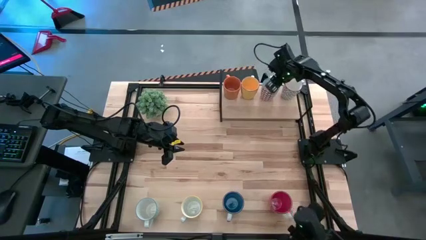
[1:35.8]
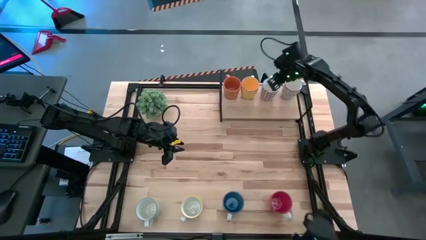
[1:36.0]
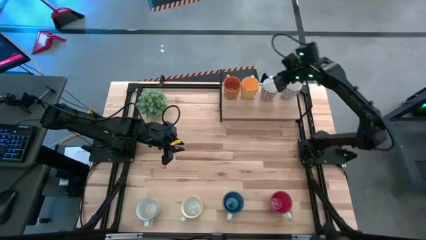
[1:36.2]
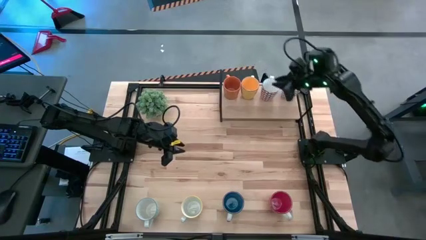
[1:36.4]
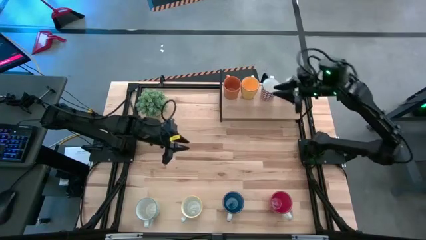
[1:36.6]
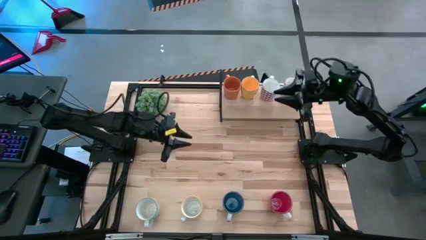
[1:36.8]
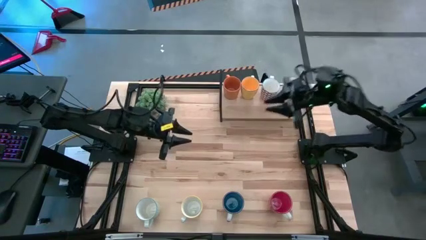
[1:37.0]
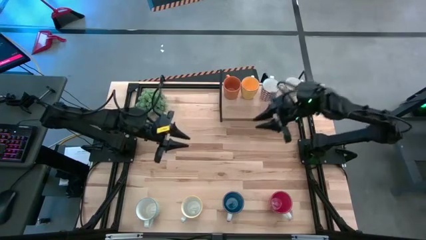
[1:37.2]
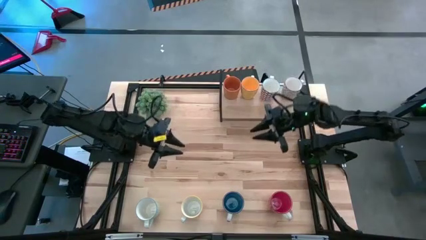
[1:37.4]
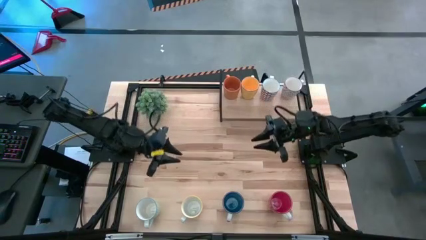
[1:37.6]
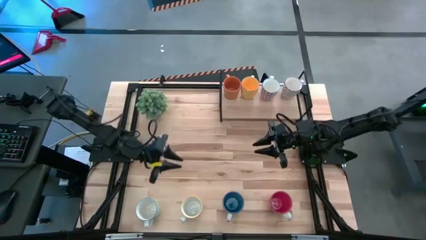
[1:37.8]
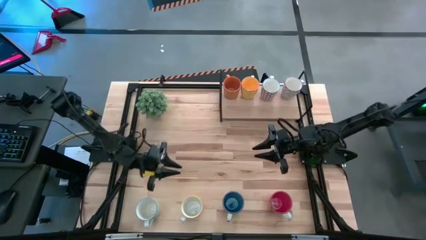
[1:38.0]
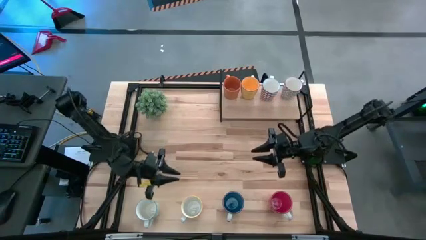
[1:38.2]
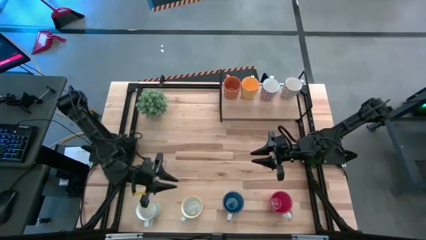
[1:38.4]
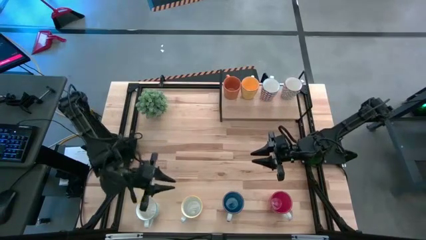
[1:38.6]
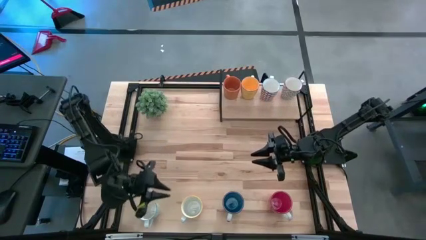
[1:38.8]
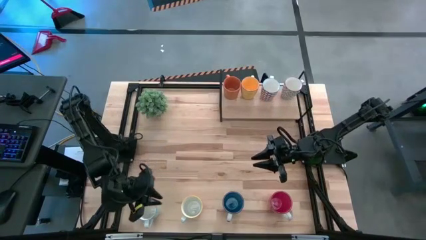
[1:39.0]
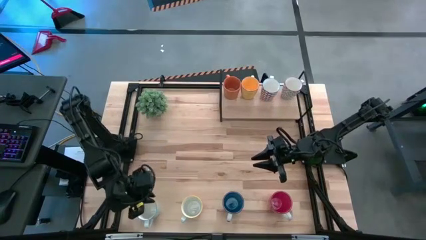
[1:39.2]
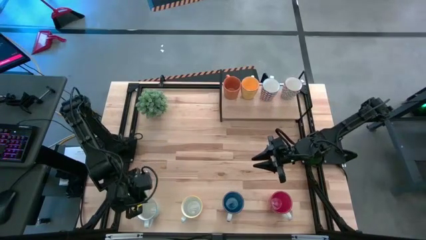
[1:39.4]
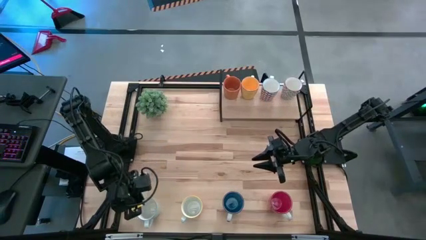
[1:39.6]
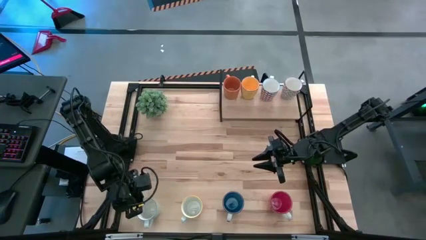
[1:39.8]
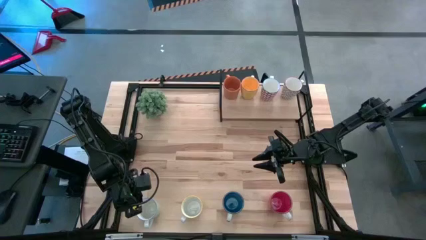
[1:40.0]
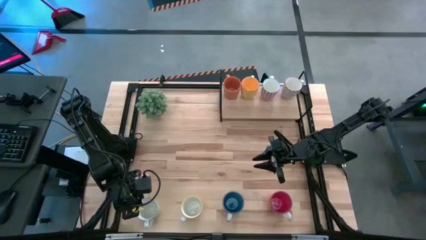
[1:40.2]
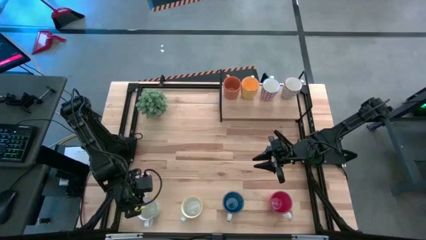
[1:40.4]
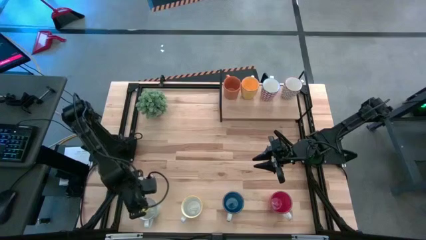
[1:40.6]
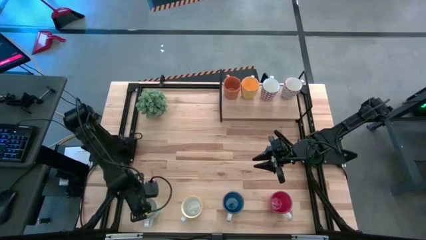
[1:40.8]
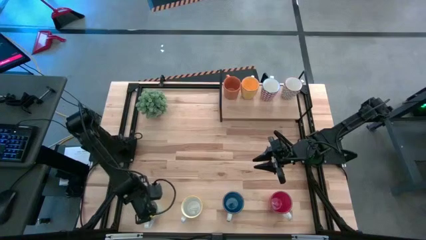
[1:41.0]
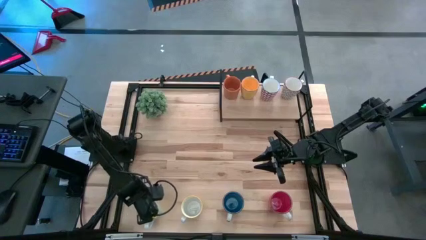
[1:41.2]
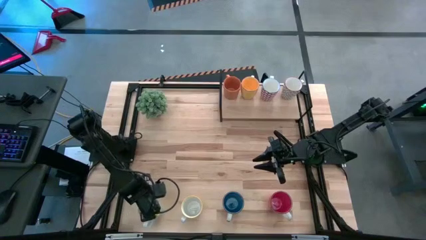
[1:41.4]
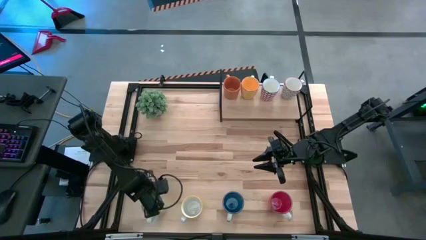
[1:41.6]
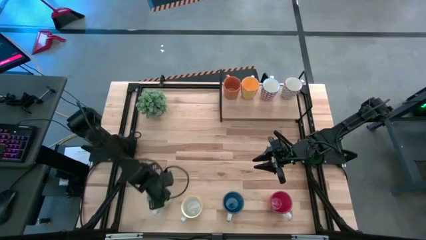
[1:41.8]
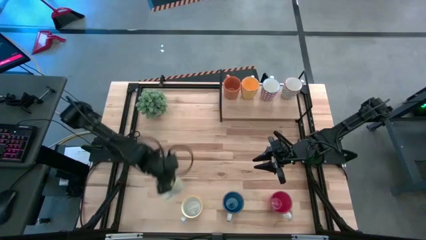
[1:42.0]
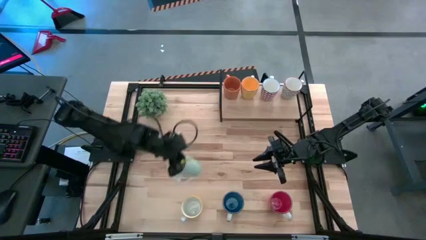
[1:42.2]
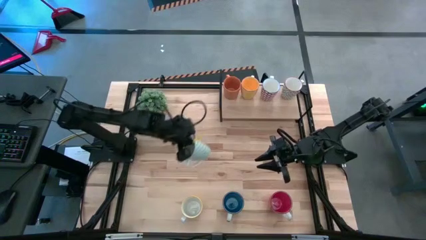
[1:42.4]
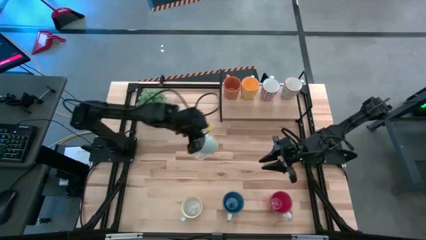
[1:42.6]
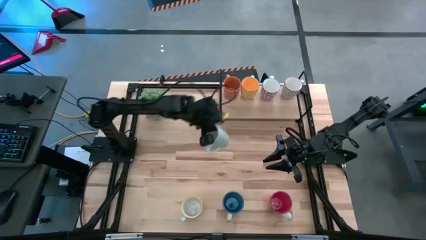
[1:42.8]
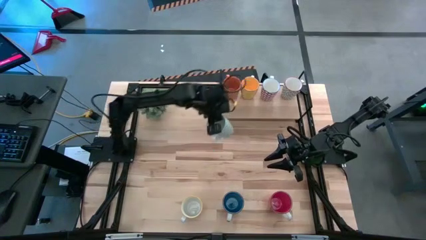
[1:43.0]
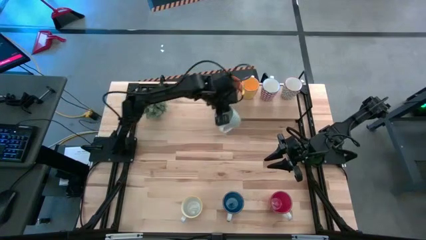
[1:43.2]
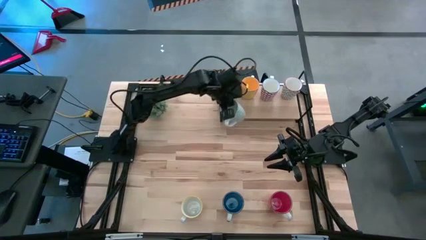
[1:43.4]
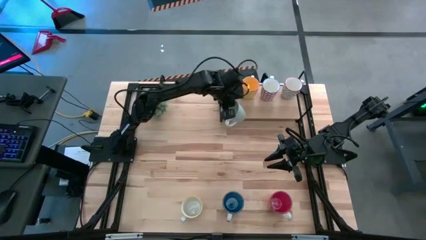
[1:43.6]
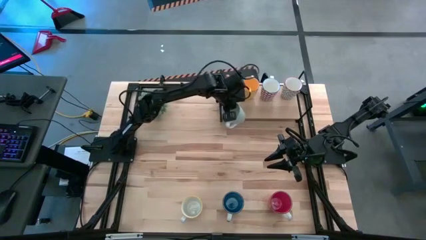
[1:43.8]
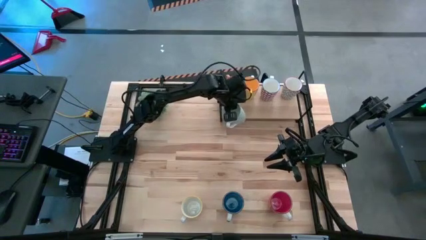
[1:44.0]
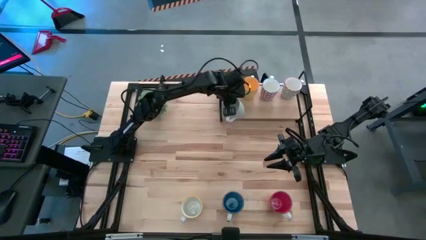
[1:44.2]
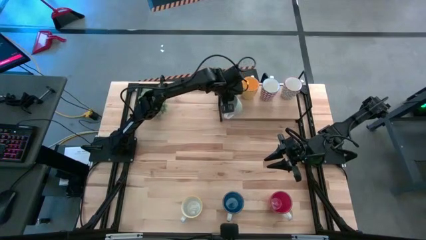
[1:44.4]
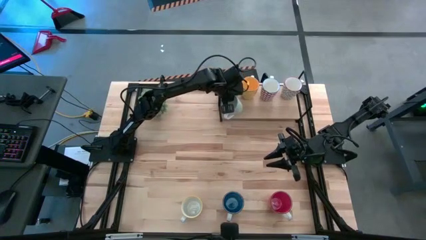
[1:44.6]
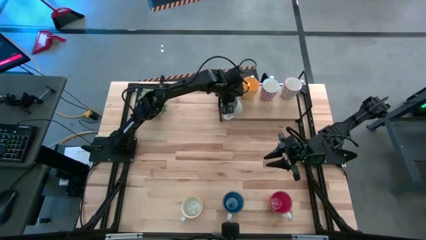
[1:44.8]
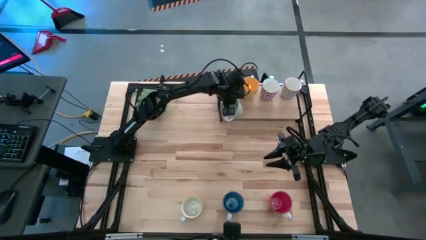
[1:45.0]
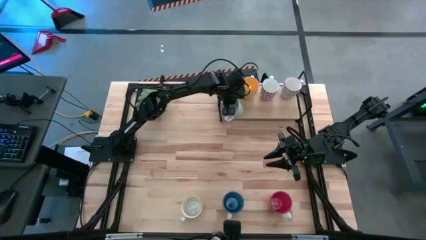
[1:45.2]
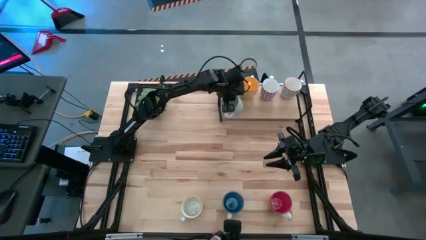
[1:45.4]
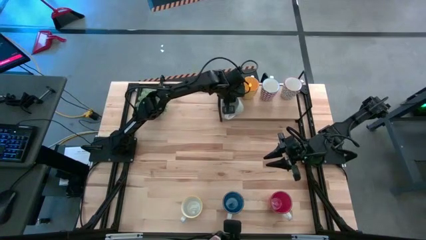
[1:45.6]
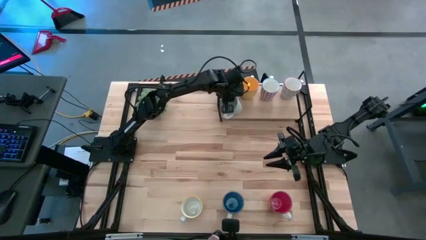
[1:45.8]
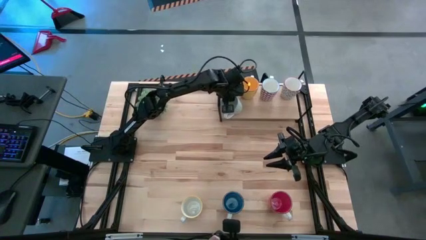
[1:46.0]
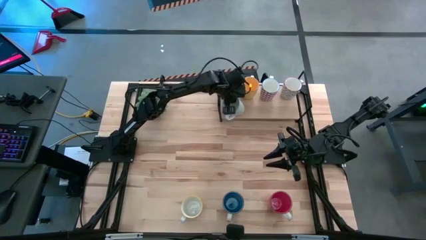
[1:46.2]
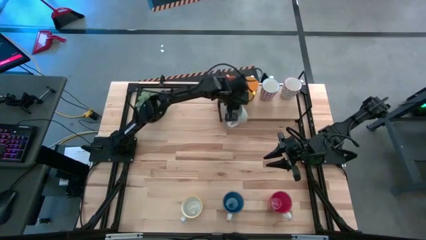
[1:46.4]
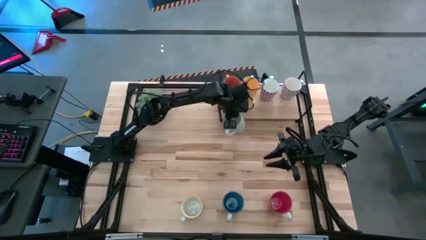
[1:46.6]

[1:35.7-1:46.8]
Task: Place coffee mugs
Put the green patterned mug on the shelf

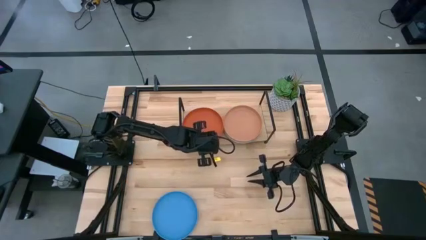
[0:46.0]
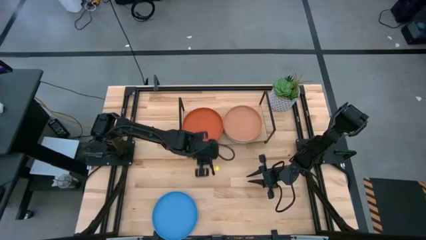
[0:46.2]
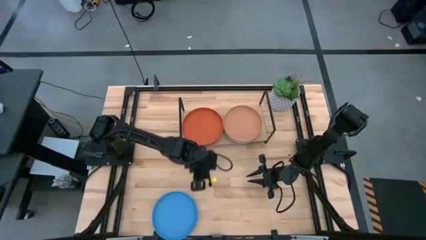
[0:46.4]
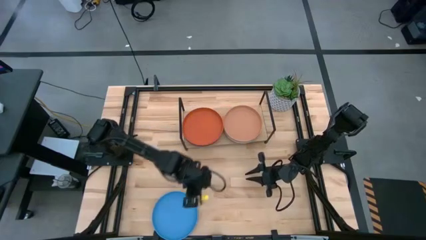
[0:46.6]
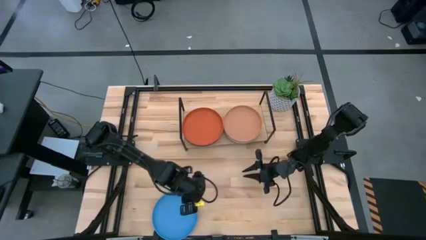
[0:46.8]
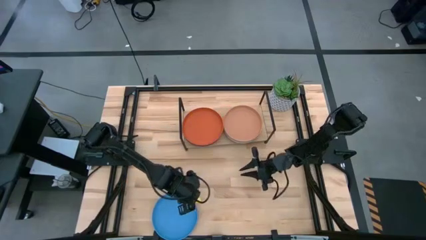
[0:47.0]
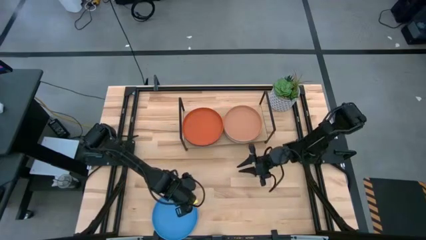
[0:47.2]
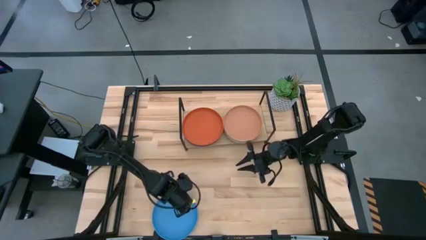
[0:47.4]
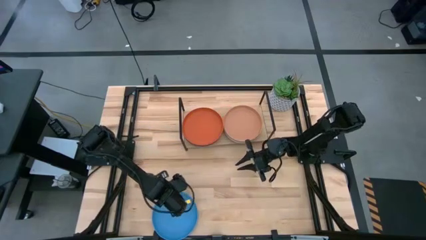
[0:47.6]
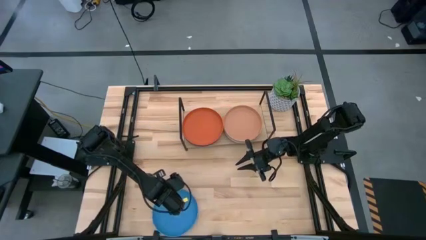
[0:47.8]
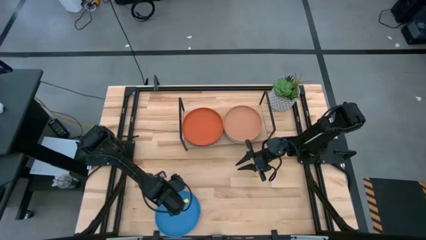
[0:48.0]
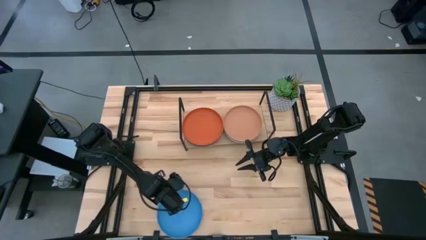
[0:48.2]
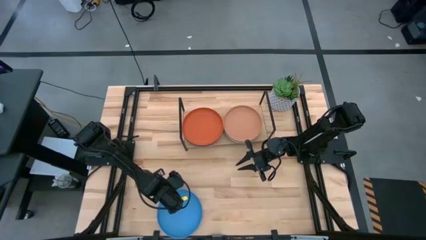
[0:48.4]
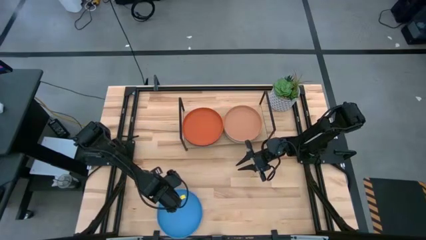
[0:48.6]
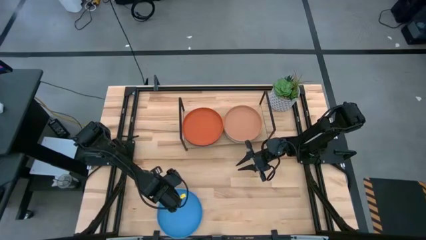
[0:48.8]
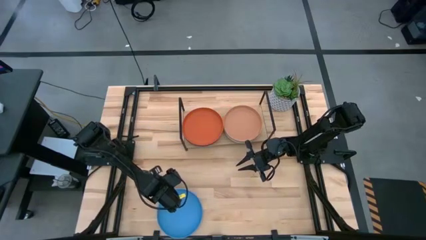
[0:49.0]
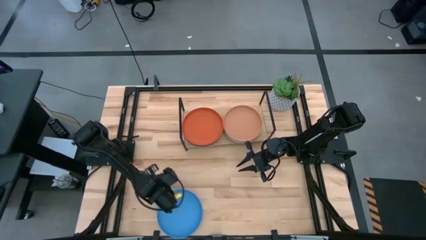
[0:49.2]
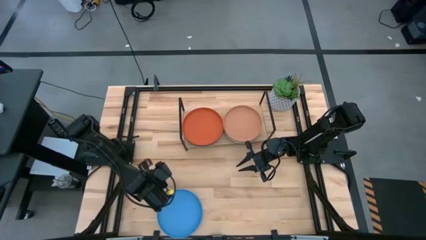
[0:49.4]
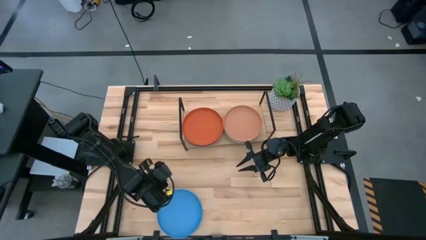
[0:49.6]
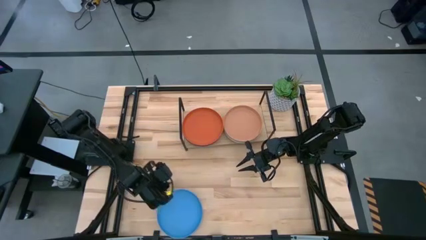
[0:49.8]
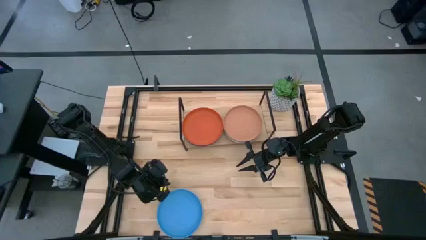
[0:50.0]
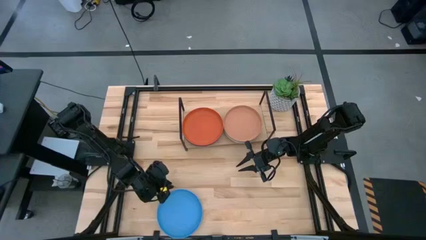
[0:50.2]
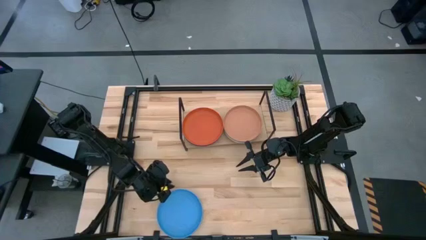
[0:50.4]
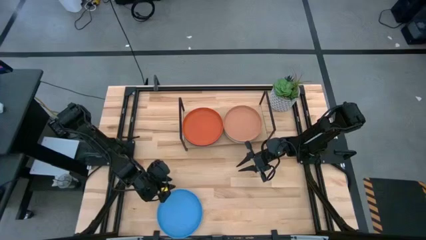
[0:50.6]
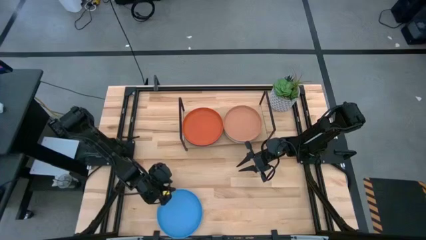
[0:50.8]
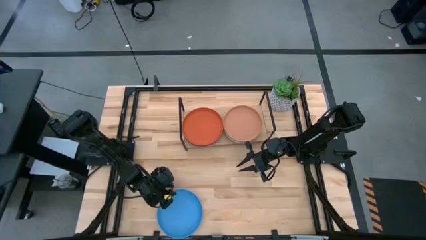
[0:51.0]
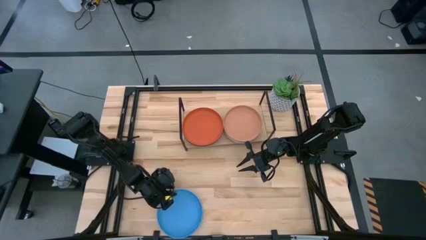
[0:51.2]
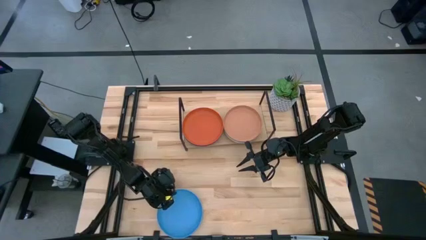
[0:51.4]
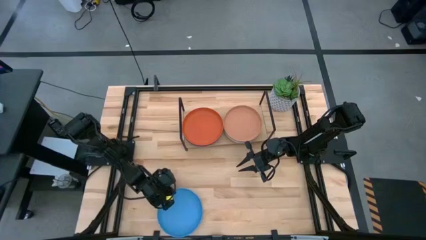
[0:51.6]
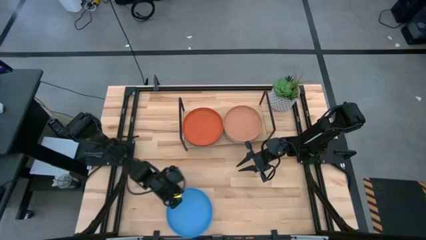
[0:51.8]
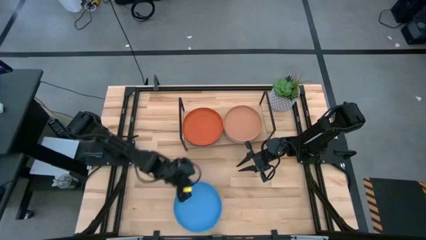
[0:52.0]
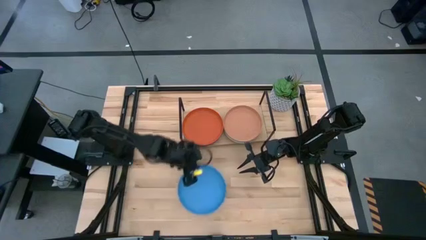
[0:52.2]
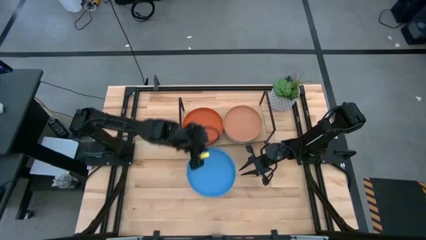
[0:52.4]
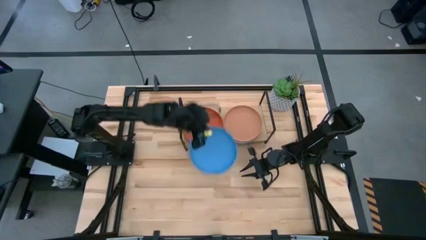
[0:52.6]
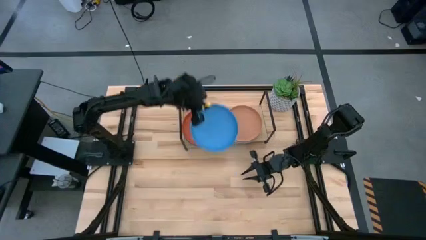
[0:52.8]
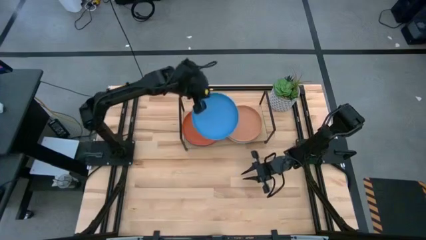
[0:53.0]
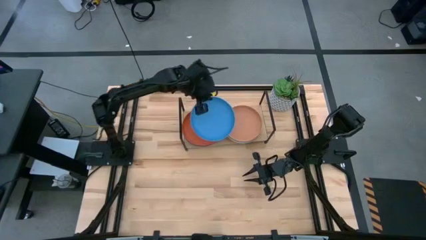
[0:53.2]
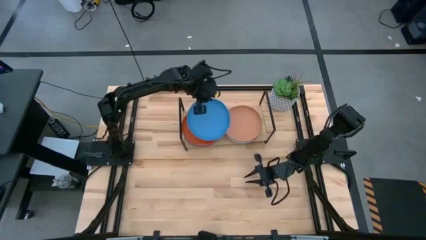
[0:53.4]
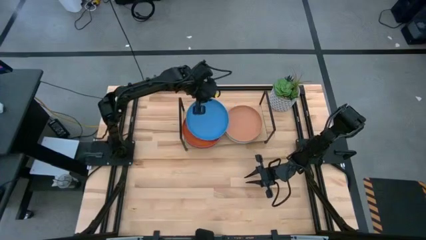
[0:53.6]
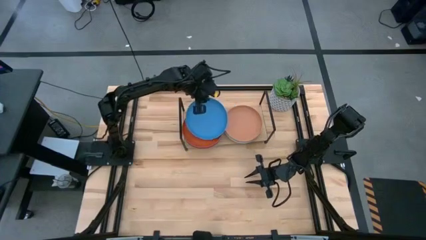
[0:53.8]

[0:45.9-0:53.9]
Task: Place and stack plates onto a shelf
Stack the blue plate on top of the orange plate on the shelf
